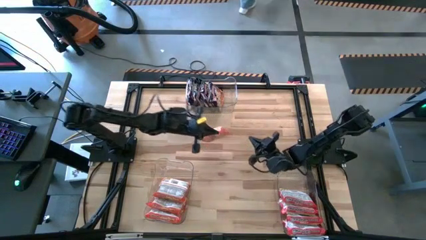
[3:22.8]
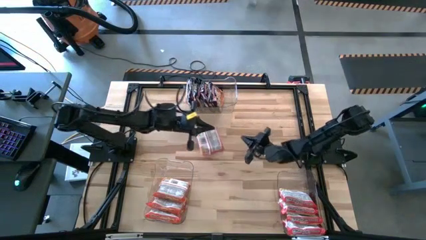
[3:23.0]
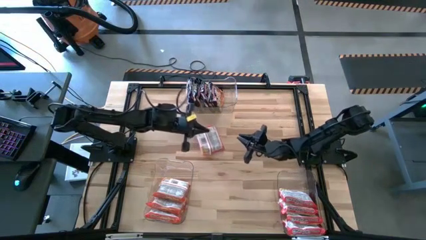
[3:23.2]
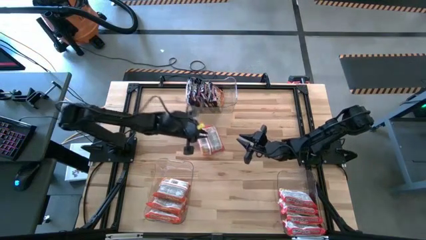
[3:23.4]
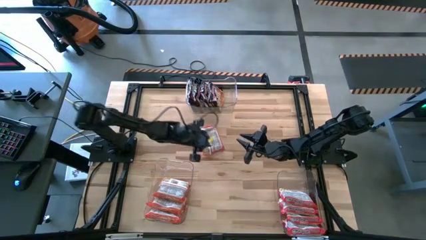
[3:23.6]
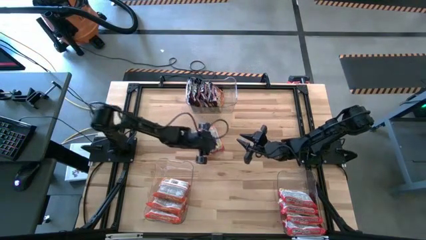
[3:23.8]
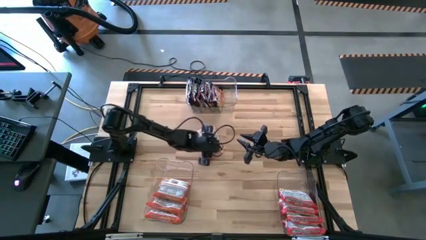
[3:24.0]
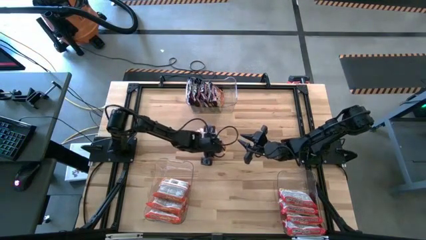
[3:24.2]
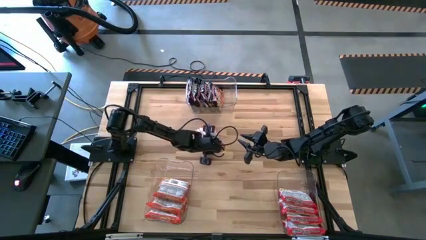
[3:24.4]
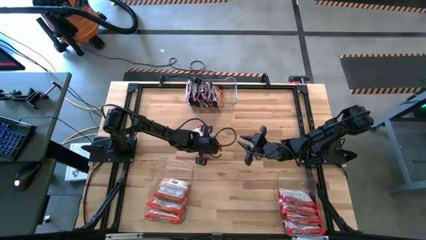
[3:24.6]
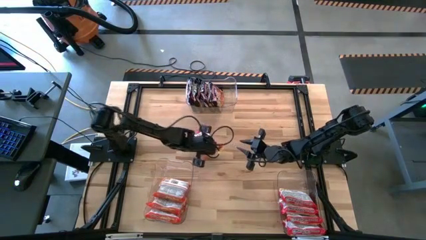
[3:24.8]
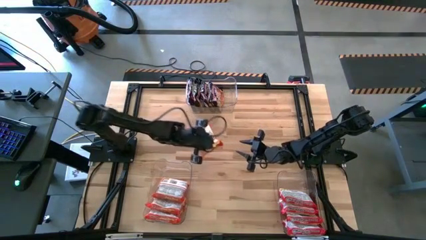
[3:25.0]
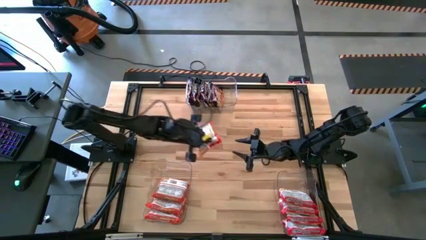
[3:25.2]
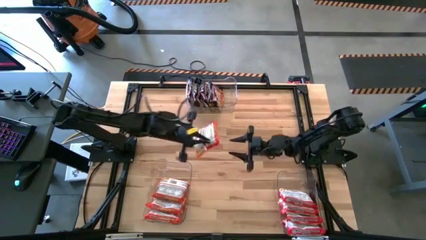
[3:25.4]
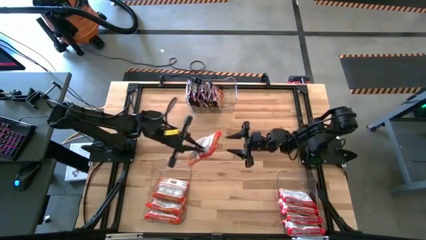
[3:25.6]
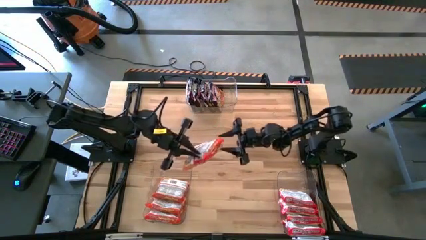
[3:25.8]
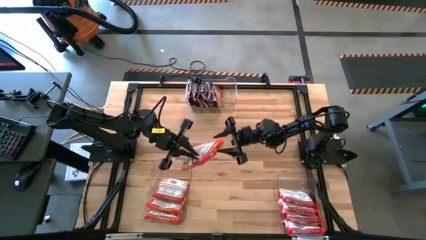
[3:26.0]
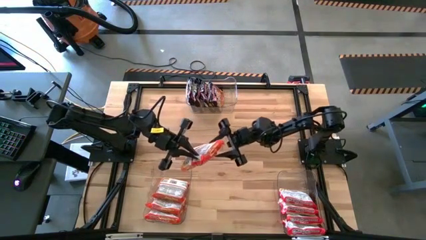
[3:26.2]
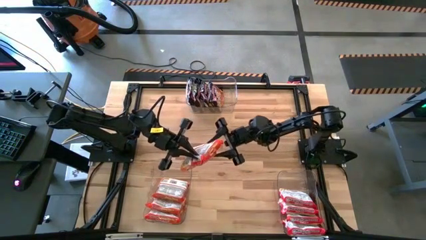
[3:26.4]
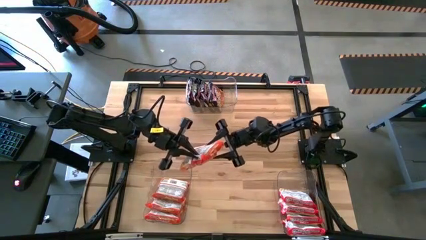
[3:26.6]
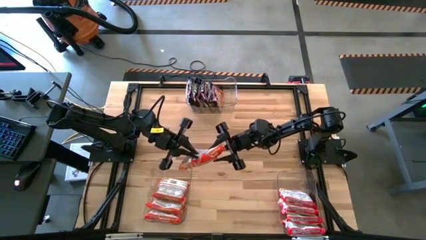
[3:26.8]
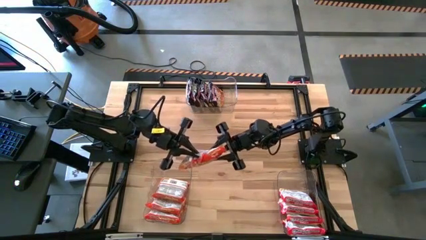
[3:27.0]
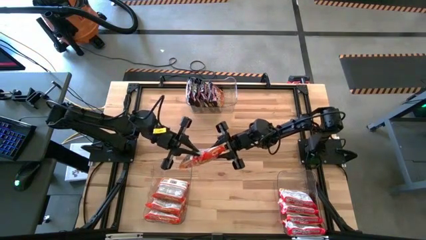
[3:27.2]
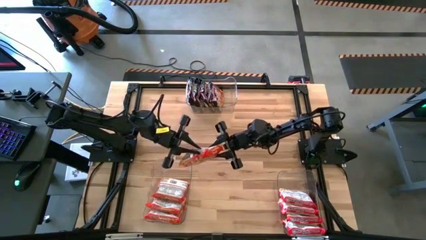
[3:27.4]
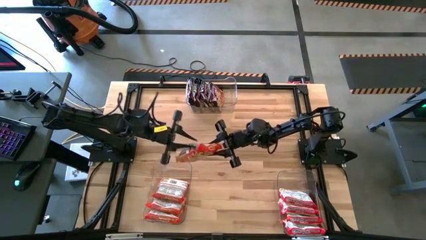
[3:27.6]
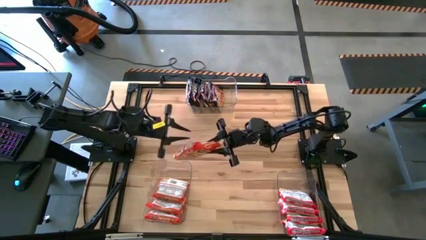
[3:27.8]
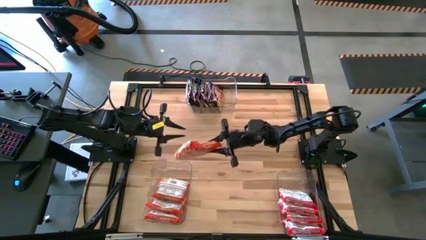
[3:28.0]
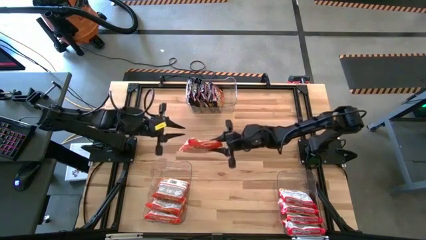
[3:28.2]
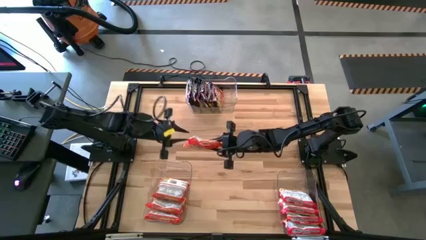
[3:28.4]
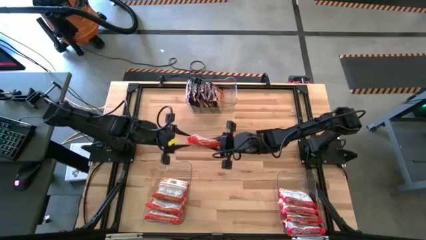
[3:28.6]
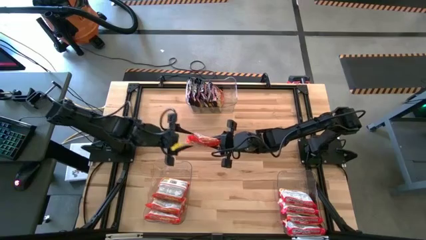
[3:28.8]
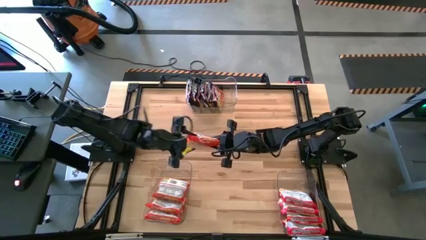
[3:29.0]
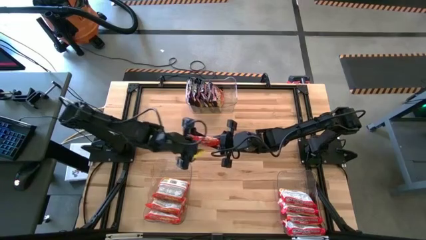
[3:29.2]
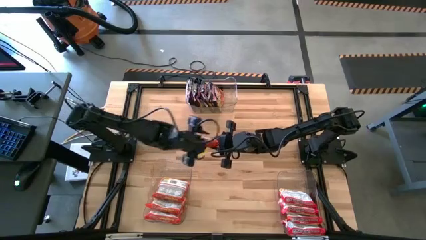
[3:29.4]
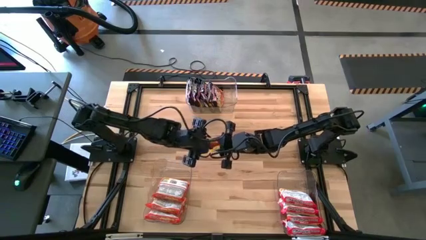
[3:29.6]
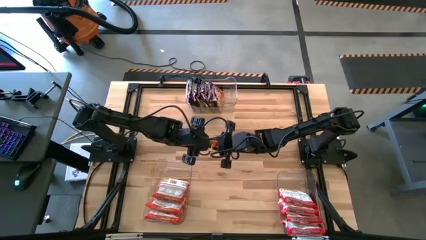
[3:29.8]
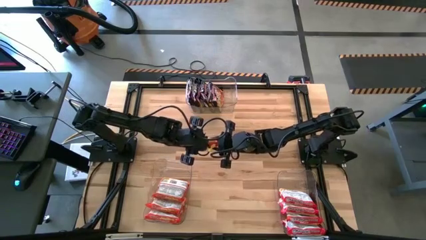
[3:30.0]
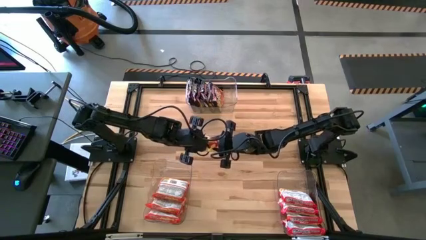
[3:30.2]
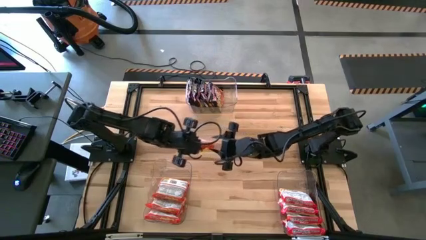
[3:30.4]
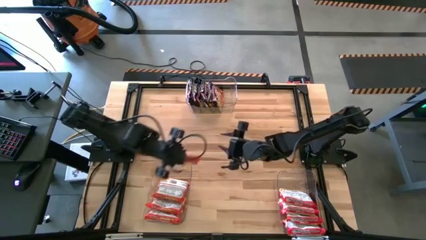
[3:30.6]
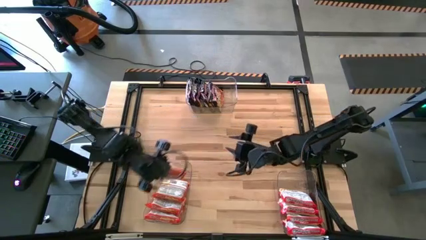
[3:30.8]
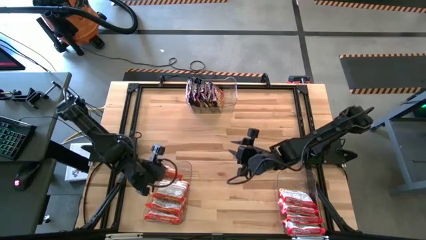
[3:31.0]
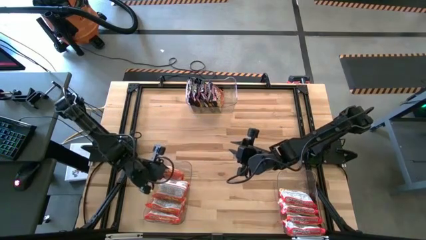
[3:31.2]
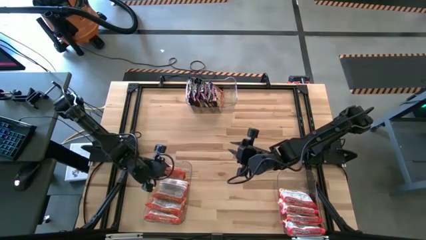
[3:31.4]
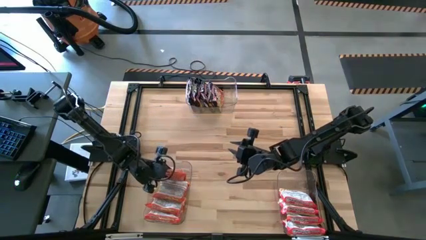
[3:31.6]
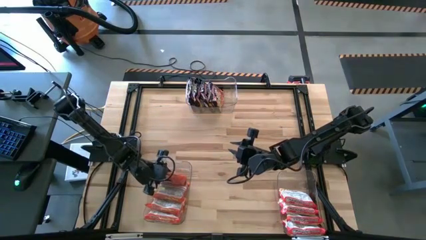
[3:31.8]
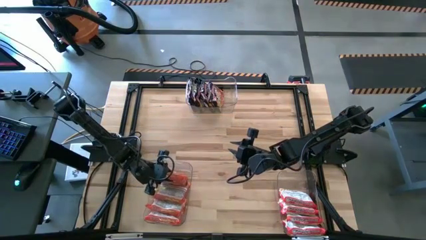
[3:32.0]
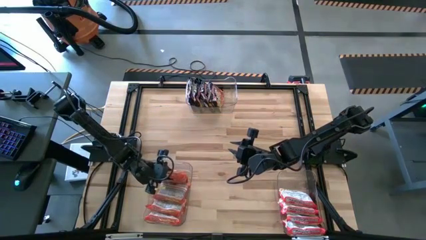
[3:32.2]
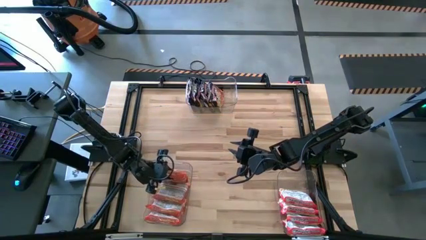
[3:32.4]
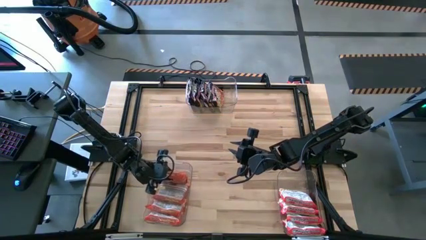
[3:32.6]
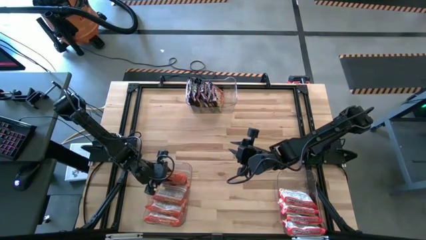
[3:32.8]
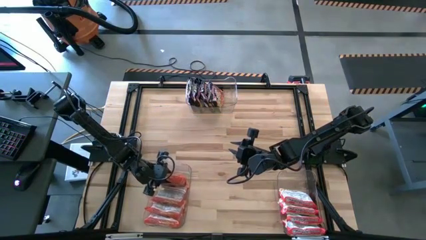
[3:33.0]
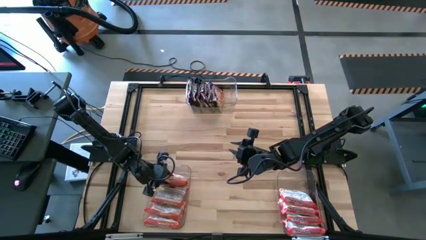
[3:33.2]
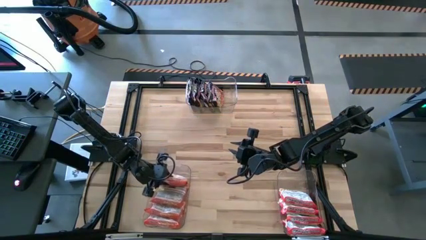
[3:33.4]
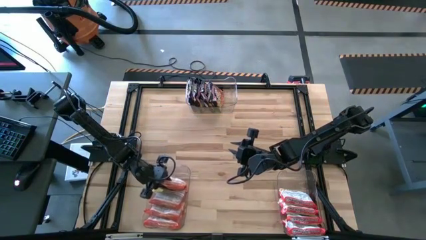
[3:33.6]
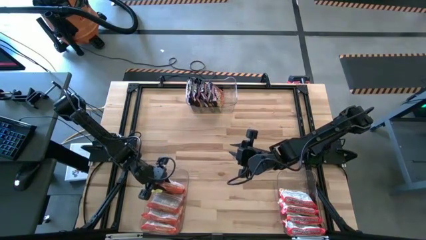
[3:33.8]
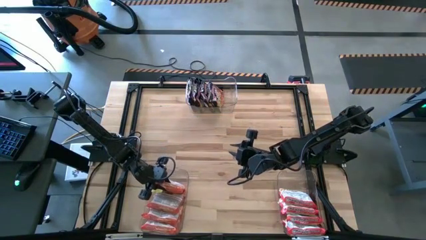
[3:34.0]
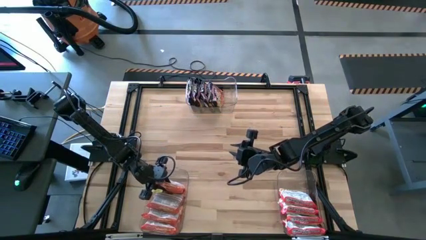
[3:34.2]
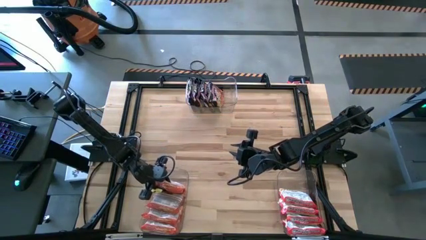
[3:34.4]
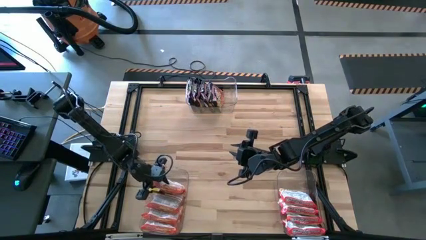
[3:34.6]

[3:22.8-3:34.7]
Task: Sort Maruchan noodles
Put the orange noodle pack into the bottom left transparent bin

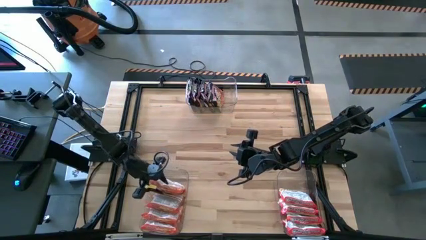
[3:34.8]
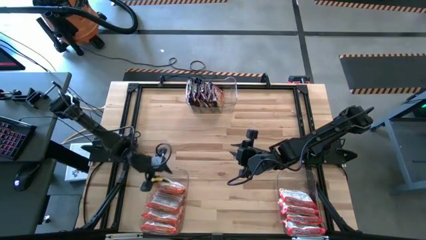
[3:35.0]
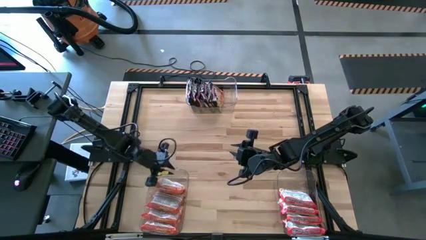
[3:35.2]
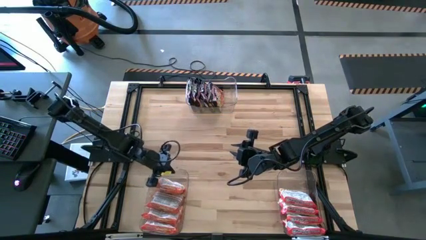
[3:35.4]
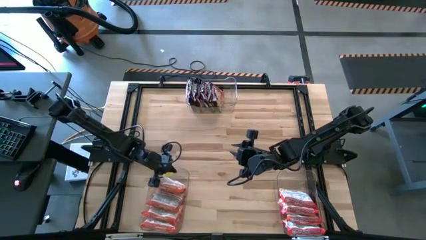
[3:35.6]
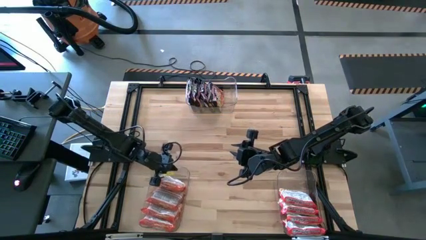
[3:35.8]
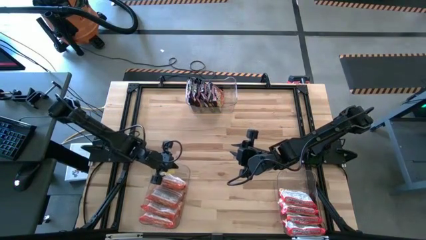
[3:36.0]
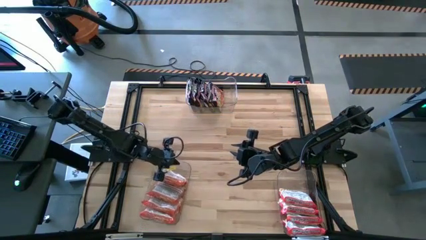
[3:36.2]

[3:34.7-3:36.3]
Adjust the bottom left transparent bin
